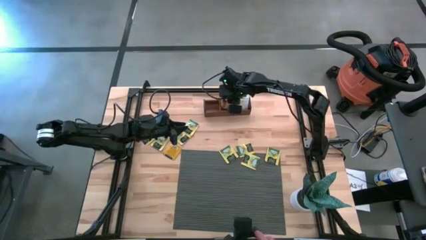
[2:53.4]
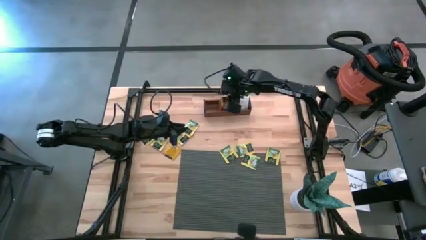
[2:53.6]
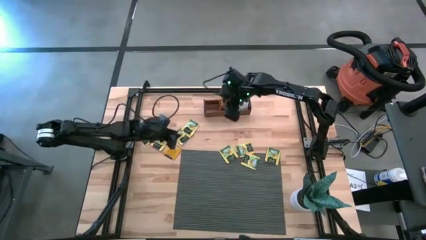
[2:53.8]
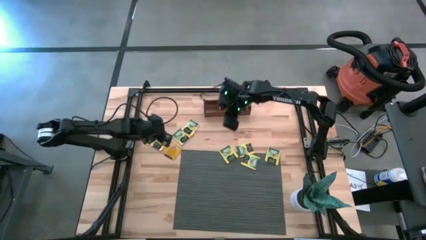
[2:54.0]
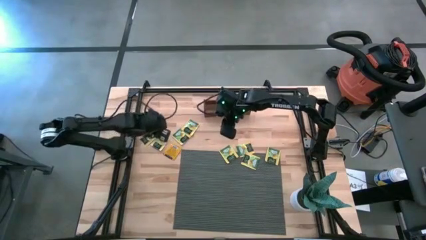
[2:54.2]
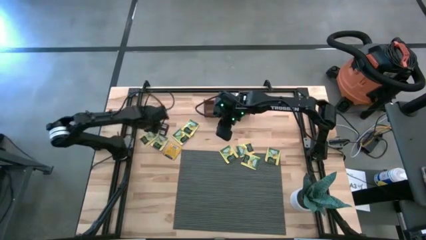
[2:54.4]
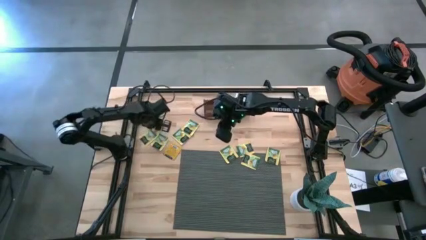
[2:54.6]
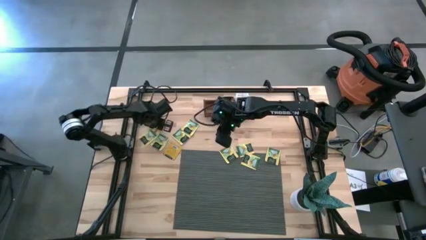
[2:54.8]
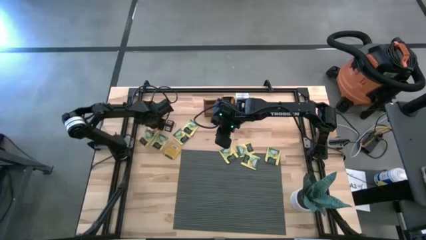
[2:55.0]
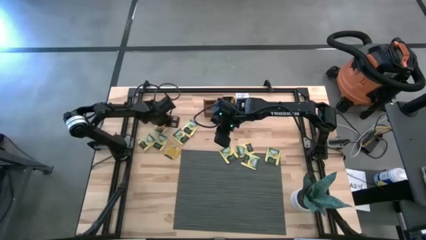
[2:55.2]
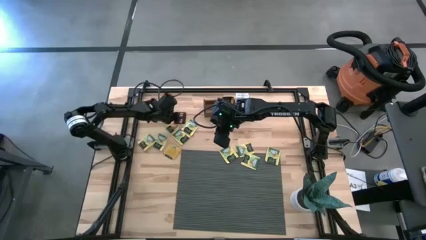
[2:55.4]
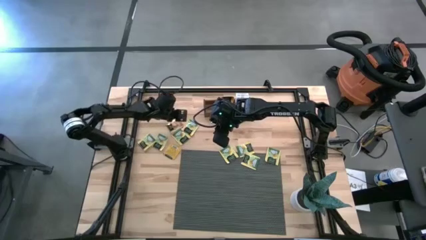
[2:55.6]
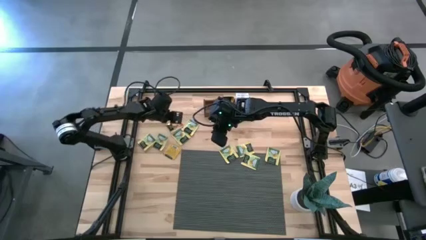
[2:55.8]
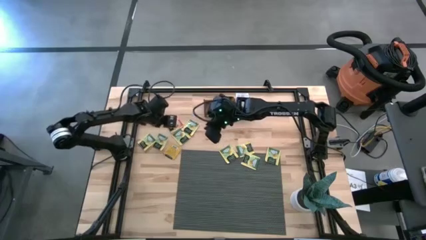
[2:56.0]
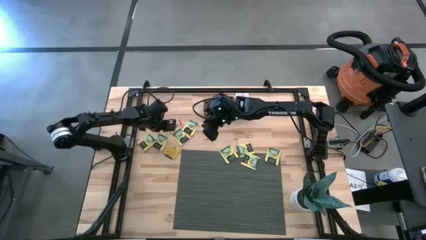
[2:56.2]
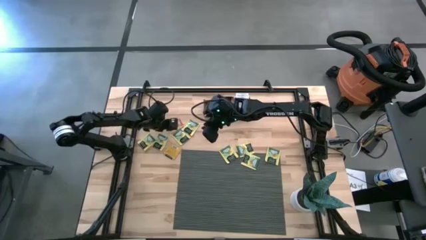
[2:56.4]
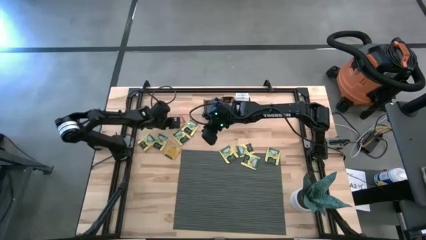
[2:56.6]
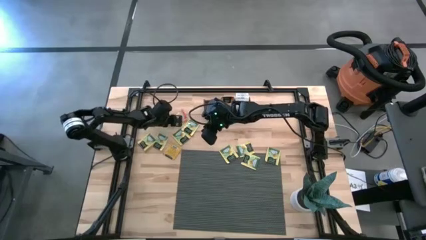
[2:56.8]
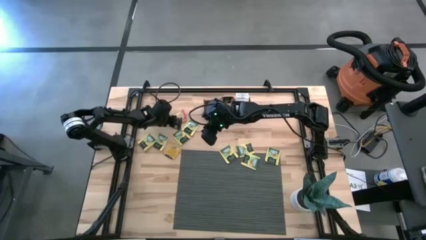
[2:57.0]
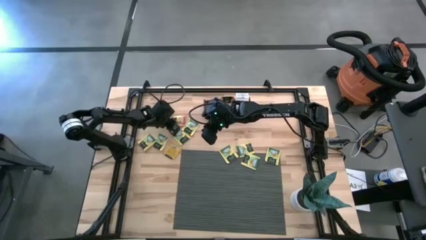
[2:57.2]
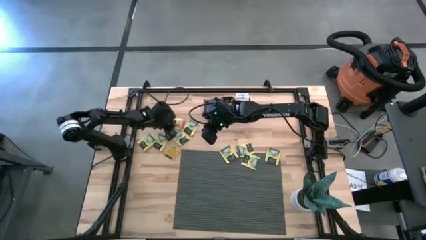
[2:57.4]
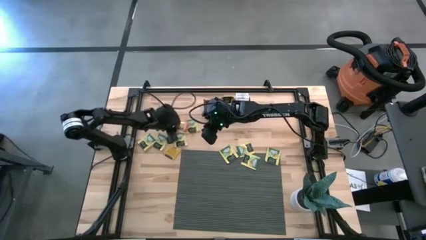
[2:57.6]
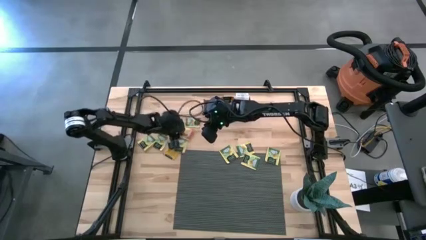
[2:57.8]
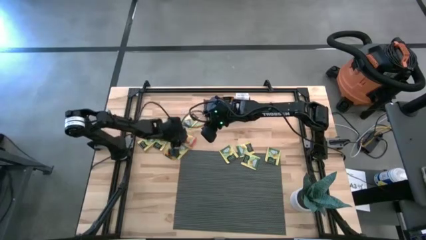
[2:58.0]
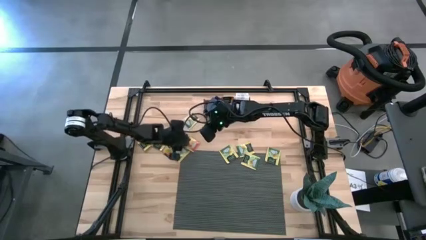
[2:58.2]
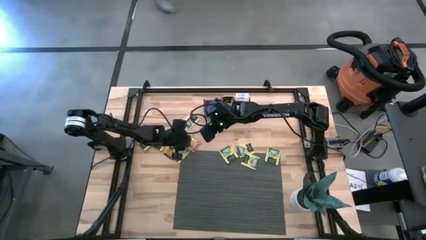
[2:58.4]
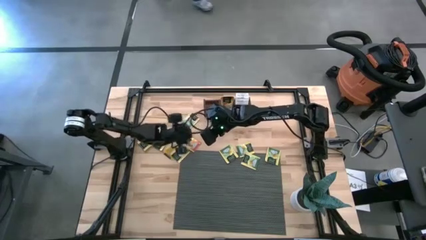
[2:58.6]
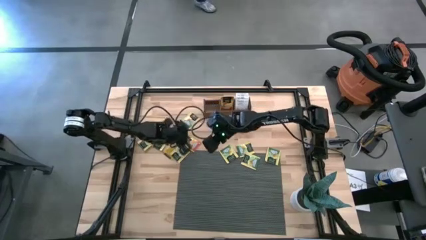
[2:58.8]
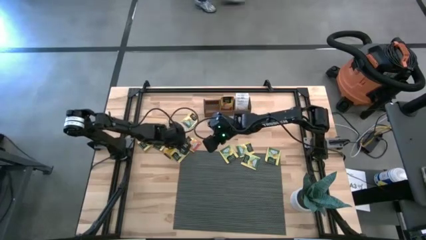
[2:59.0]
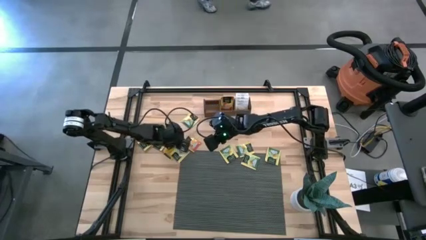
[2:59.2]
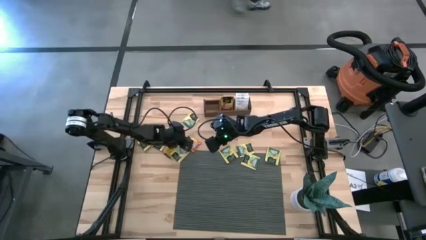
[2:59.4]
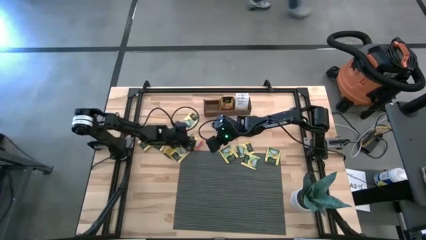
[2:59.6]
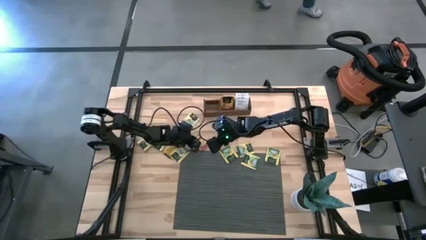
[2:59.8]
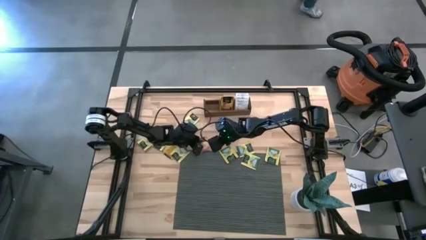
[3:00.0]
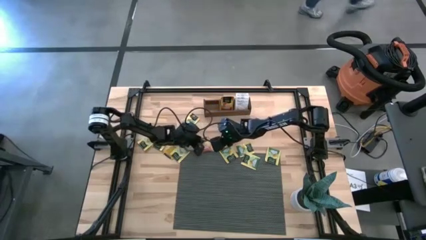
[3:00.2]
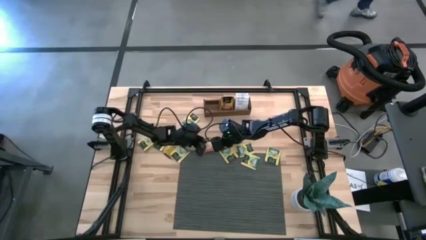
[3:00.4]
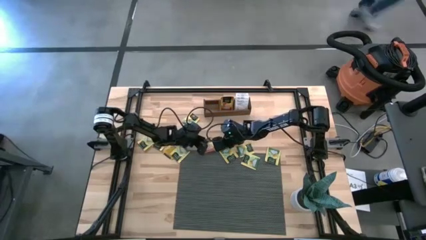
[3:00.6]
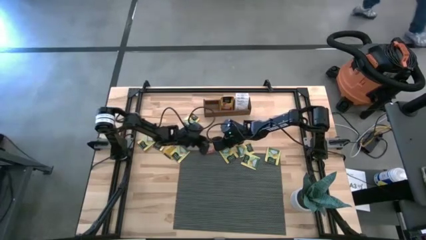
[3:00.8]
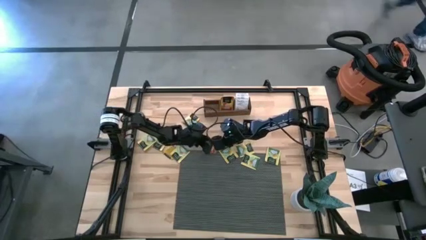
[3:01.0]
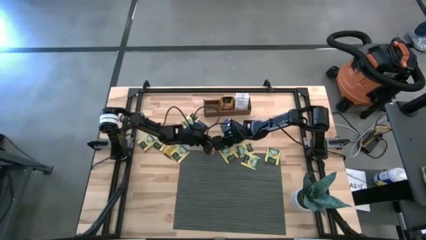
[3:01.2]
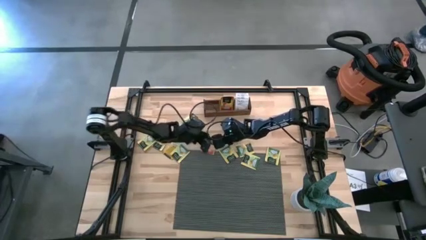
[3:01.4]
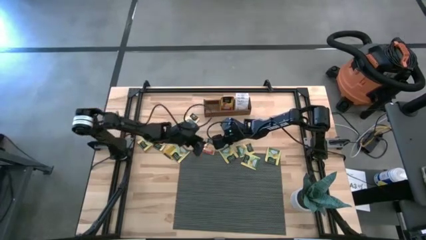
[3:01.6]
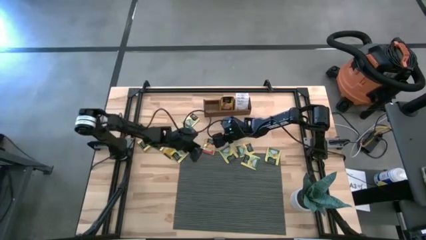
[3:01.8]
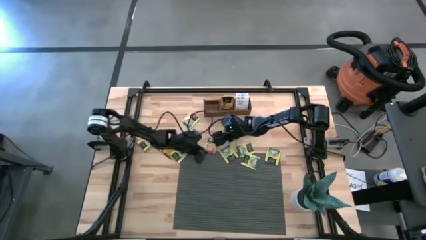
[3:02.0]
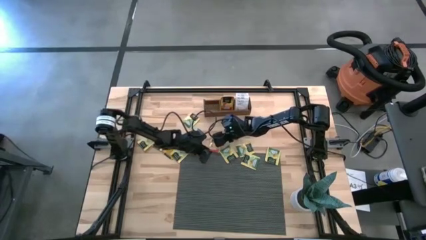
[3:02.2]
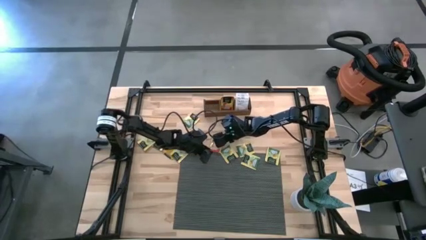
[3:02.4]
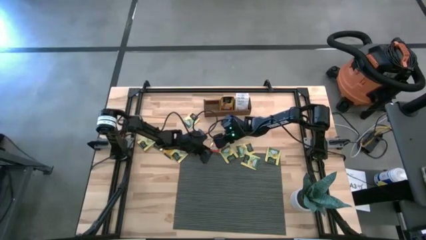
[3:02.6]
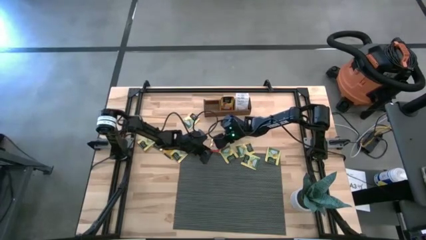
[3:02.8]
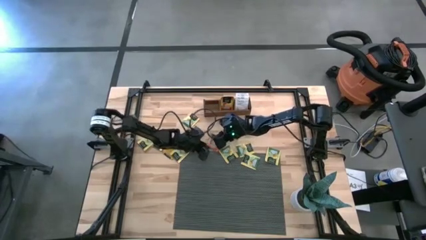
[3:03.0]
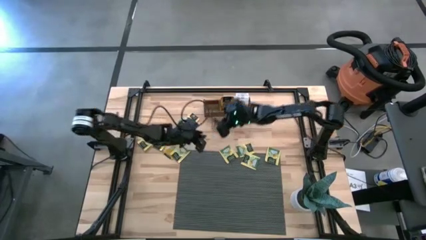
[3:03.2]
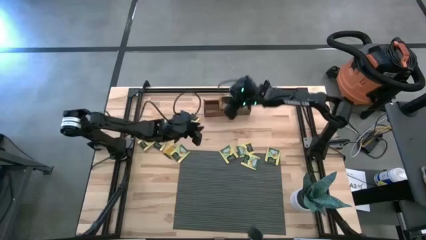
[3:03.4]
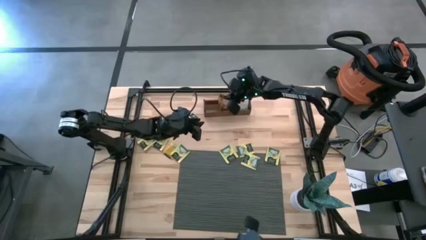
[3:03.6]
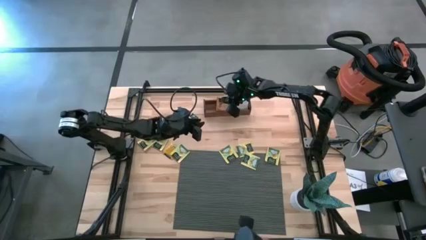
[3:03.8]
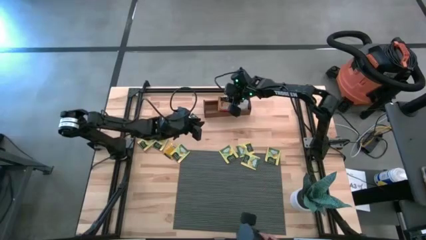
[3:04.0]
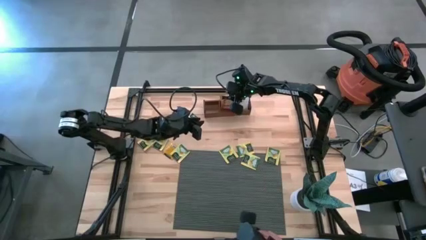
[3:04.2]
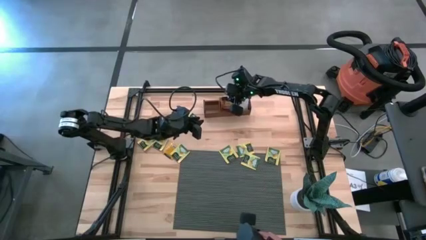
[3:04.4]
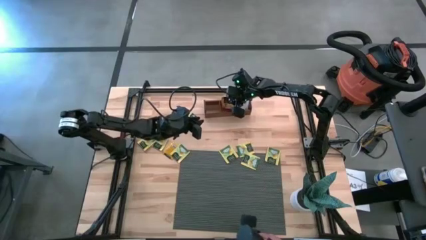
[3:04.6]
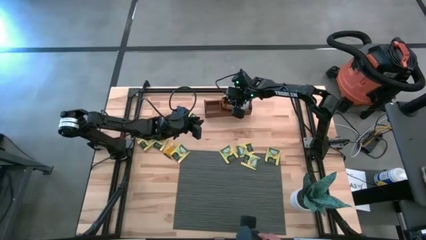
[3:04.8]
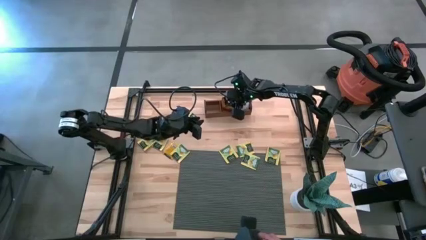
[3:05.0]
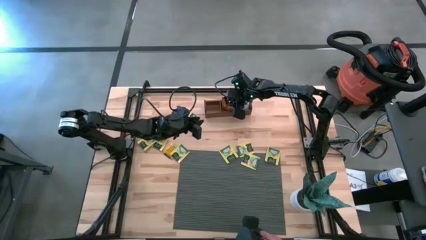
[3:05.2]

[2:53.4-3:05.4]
Task: Pick & Place Tea
Put the orange tea bag into the middle section of the wooden organizer

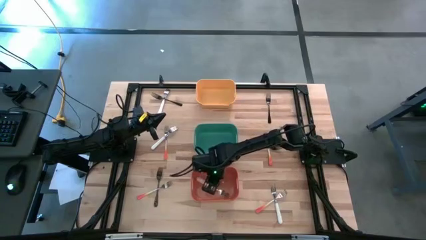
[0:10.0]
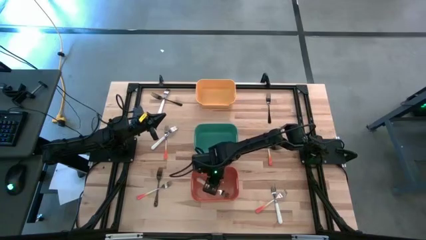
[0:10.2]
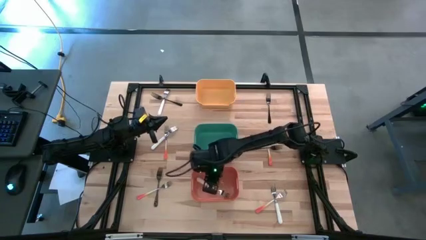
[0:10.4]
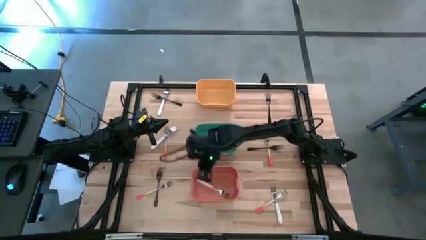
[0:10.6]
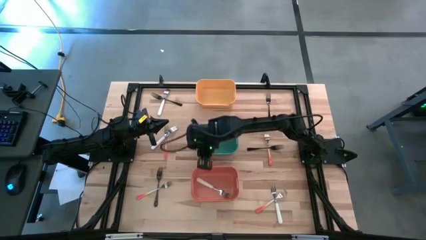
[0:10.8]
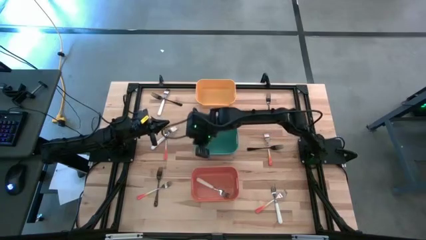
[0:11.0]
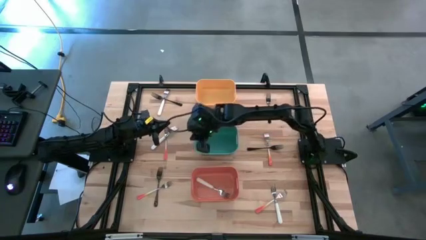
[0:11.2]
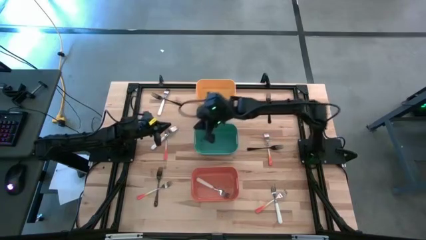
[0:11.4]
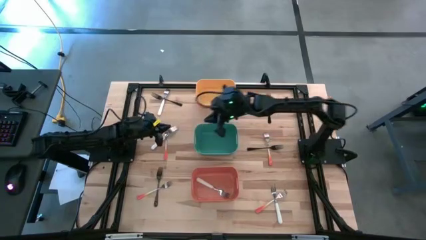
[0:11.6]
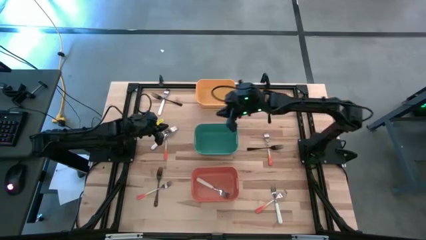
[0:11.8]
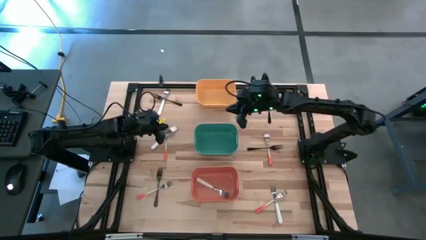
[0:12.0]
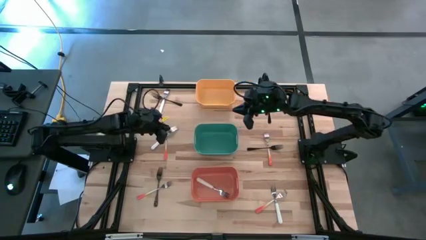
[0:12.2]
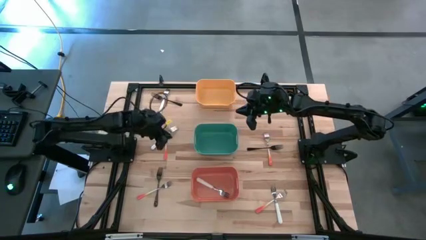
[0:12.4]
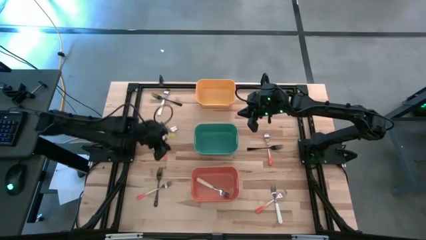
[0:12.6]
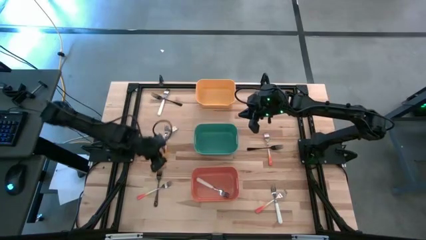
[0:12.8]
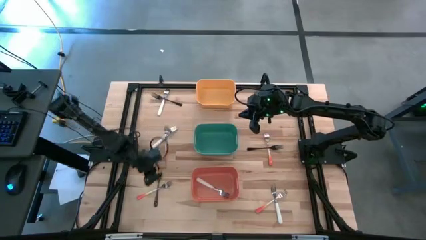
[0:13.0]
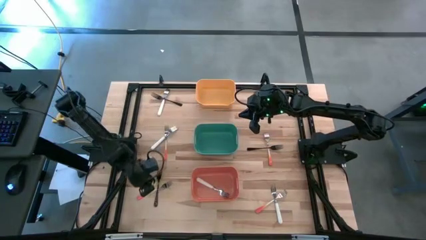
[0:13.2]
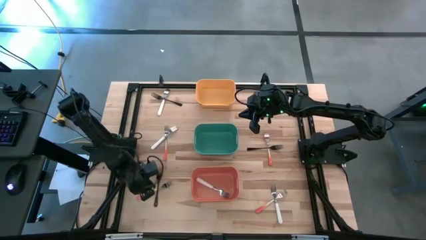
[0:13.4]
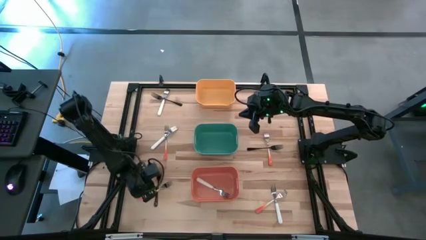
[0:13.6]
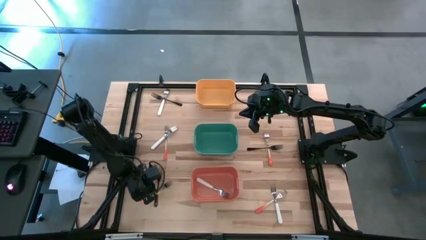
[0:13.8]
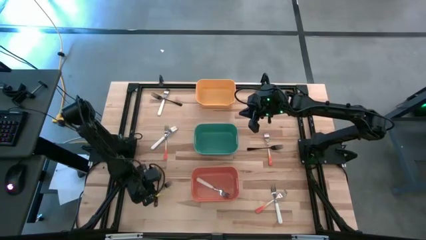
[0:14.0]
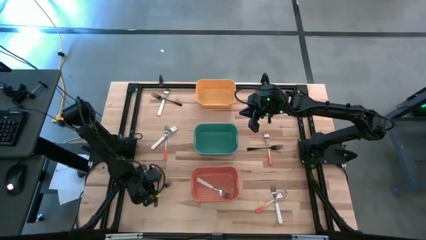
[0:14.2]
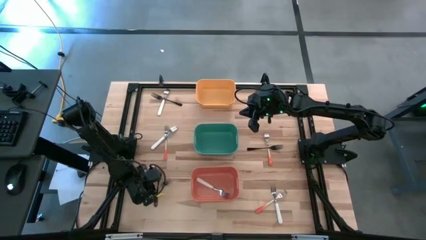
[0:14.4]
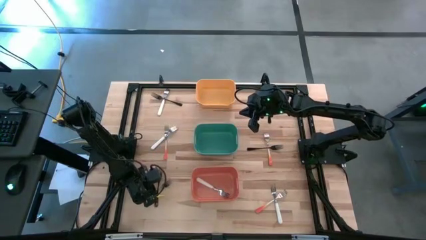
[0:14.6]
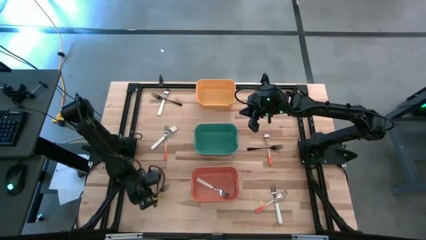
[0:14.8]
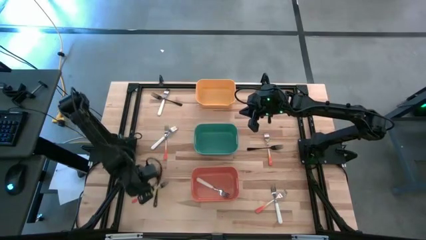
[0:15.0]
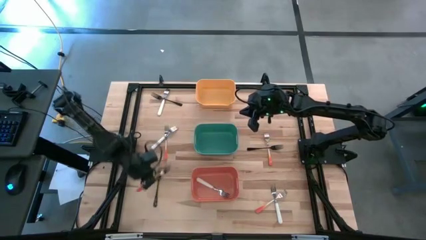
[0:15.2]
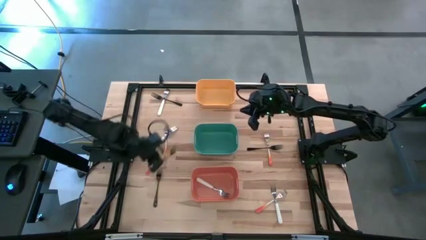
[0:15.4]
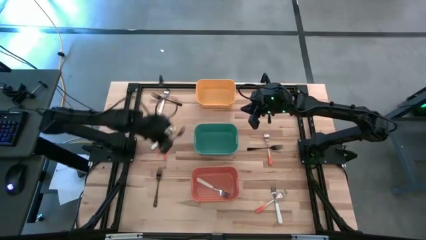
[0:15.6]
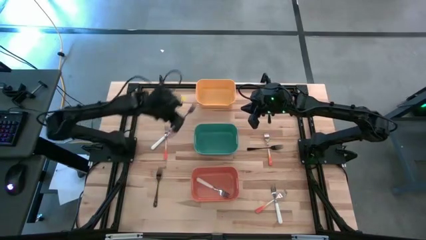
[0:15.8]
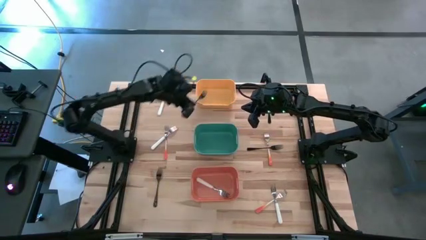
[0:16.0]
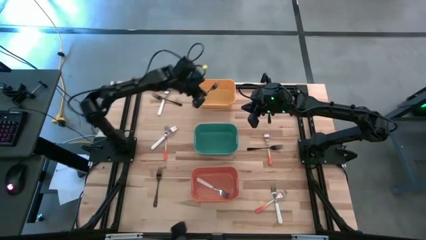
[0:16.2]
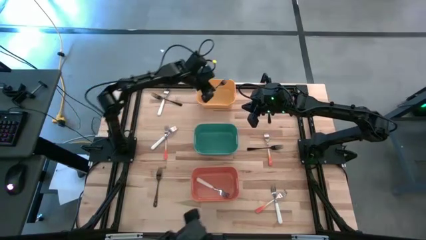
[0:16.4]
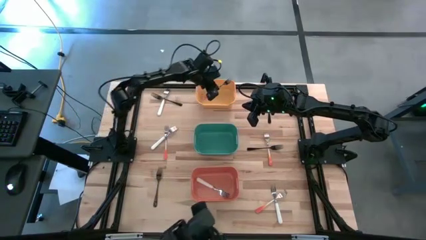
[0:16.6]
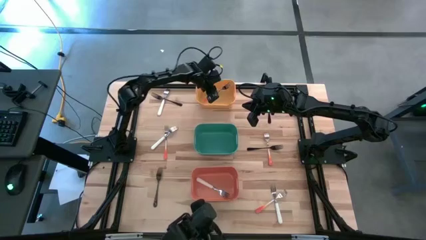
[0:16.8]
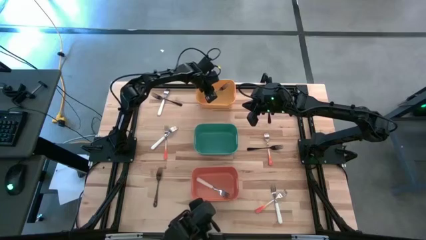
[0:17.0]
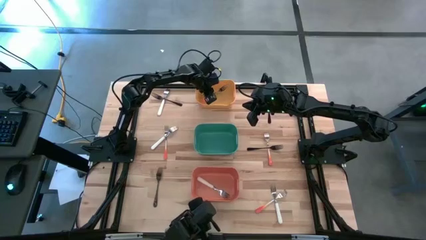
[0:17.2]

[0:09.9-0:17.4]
Task: Sort silverware by color (type)
Put the orange fork into the yellow bin
